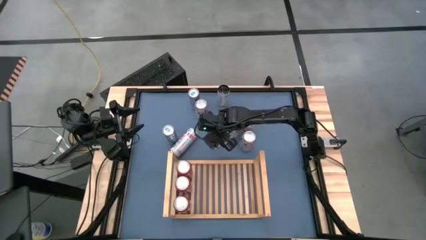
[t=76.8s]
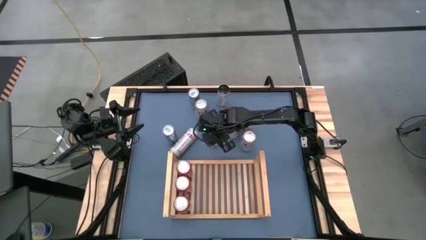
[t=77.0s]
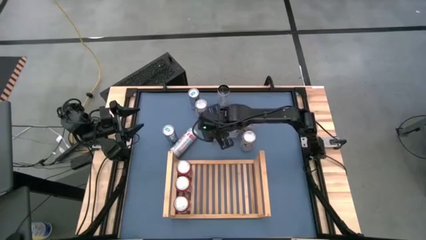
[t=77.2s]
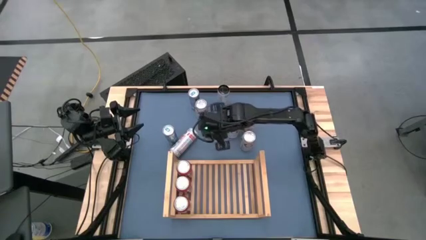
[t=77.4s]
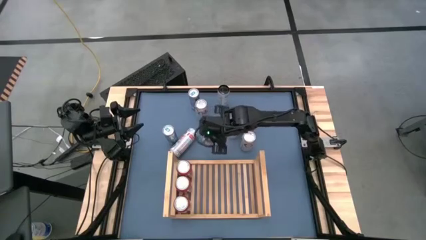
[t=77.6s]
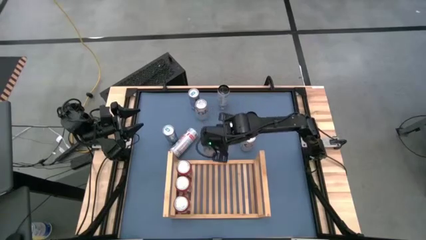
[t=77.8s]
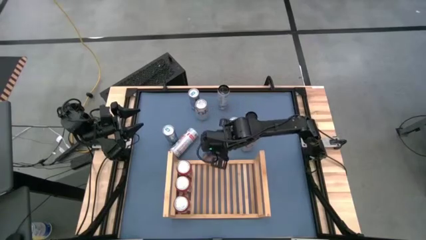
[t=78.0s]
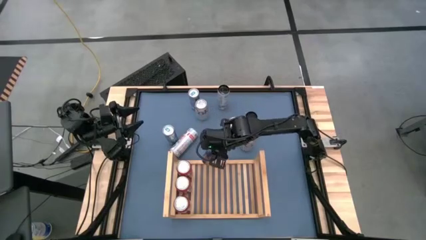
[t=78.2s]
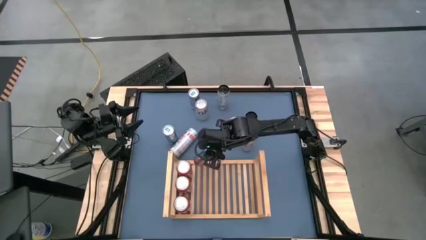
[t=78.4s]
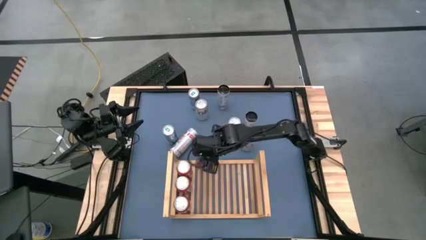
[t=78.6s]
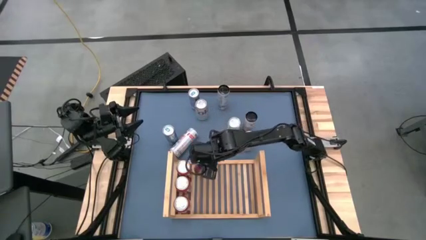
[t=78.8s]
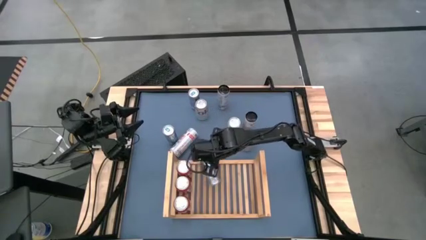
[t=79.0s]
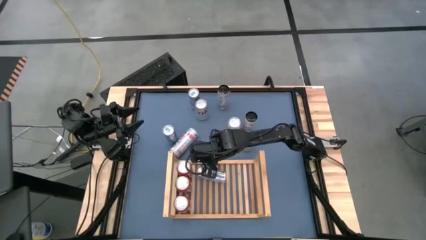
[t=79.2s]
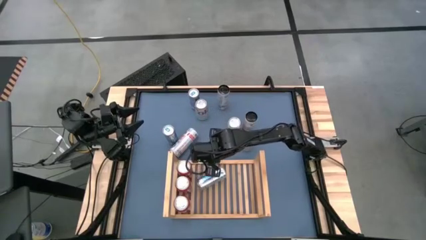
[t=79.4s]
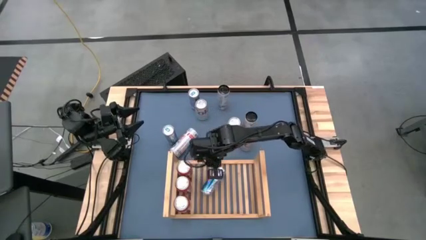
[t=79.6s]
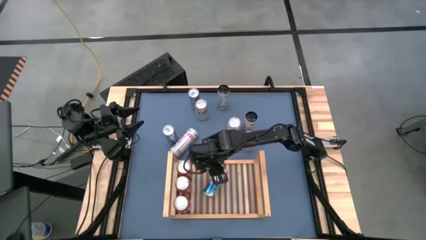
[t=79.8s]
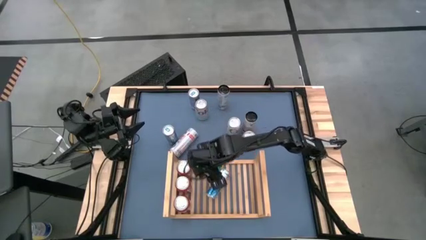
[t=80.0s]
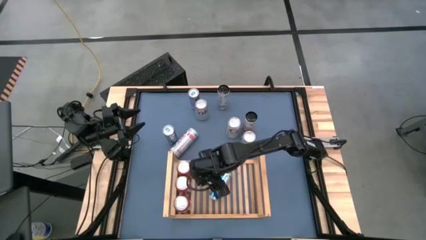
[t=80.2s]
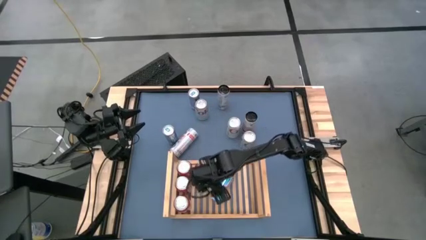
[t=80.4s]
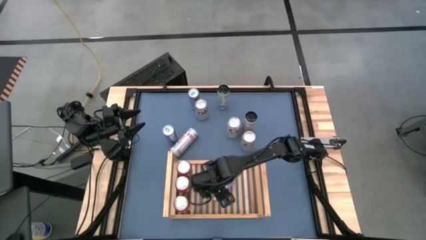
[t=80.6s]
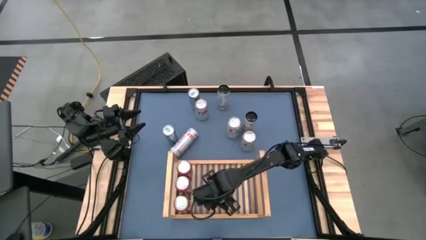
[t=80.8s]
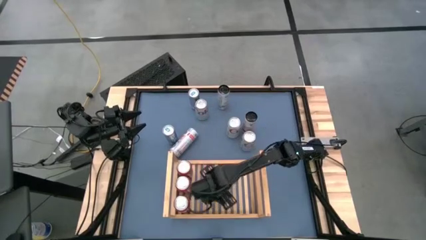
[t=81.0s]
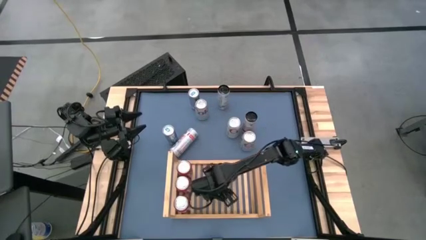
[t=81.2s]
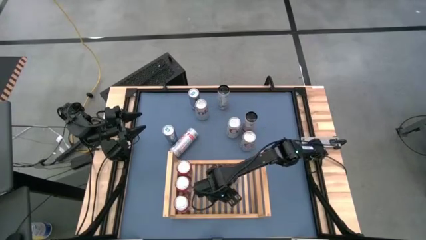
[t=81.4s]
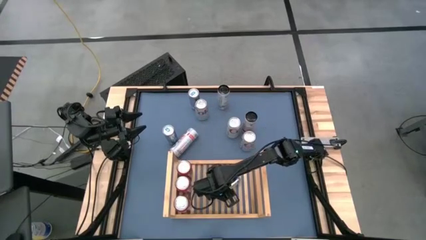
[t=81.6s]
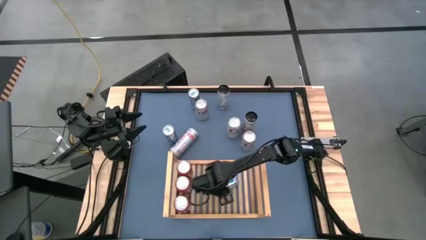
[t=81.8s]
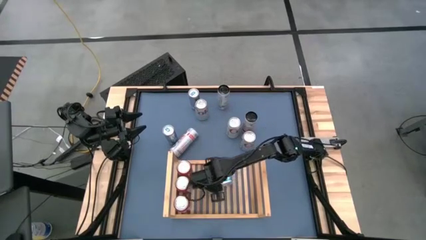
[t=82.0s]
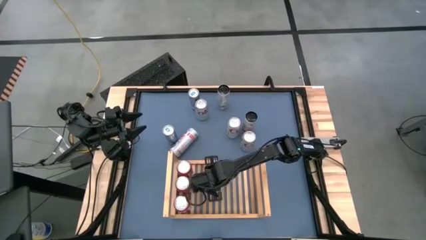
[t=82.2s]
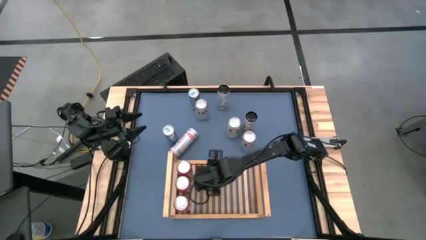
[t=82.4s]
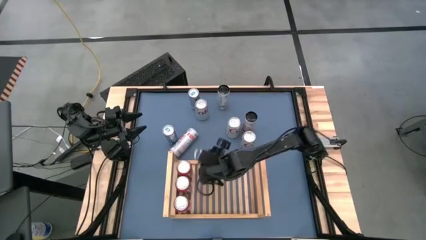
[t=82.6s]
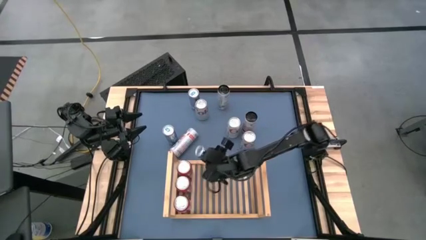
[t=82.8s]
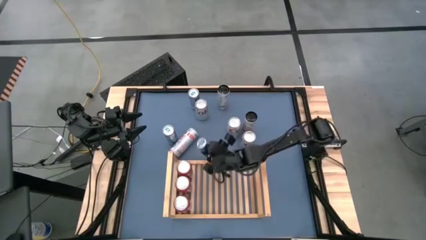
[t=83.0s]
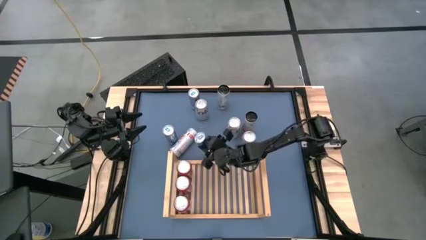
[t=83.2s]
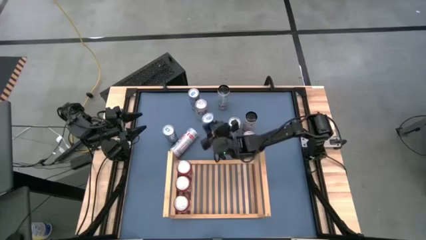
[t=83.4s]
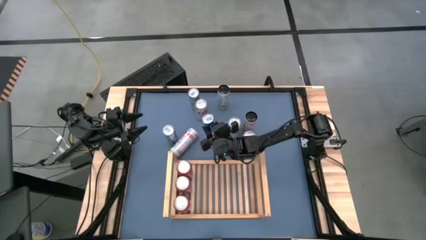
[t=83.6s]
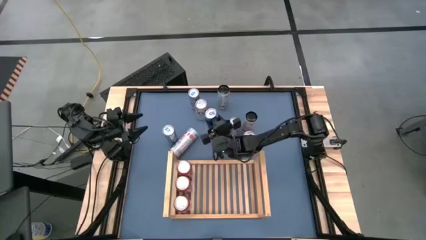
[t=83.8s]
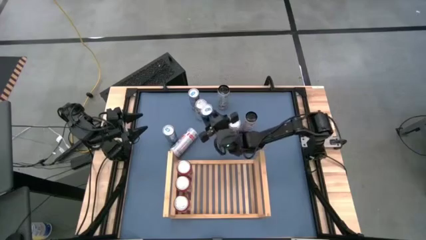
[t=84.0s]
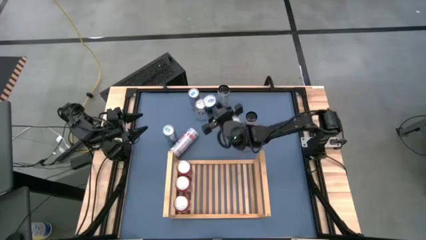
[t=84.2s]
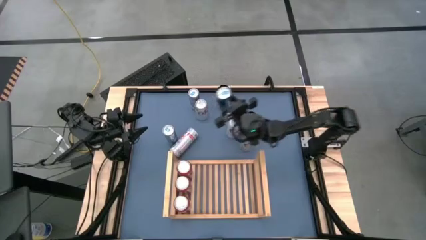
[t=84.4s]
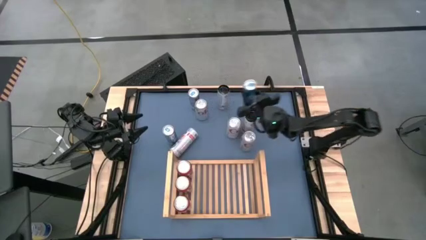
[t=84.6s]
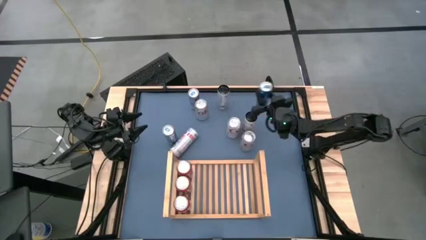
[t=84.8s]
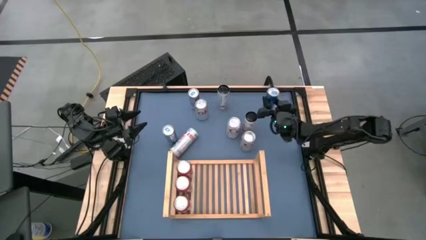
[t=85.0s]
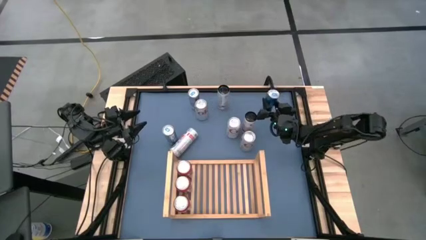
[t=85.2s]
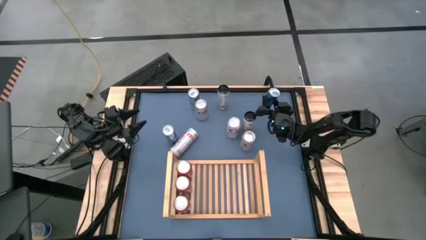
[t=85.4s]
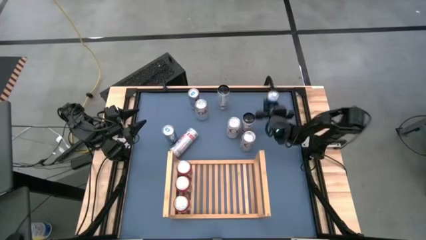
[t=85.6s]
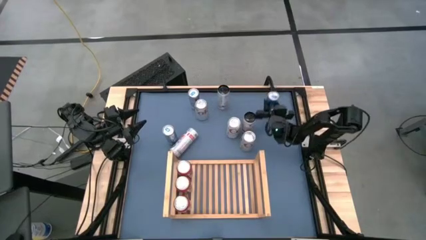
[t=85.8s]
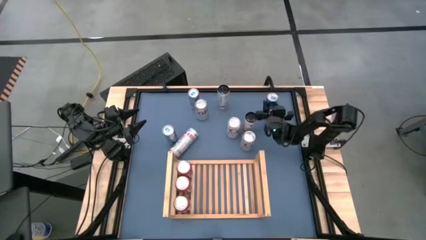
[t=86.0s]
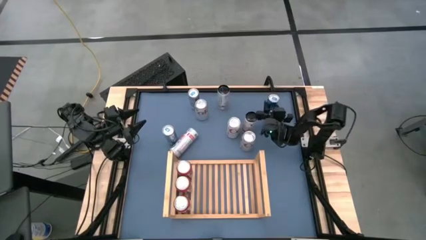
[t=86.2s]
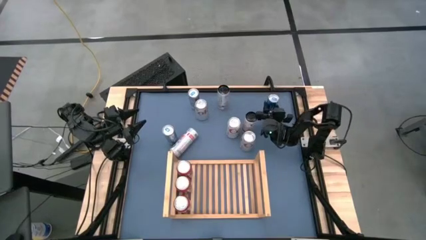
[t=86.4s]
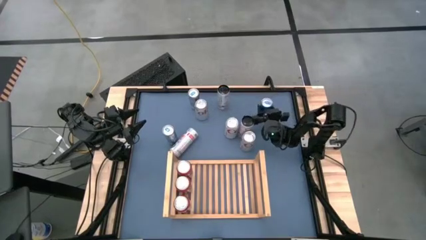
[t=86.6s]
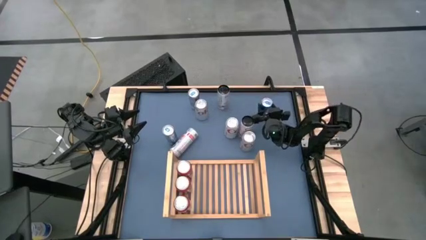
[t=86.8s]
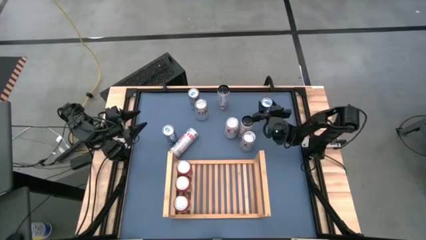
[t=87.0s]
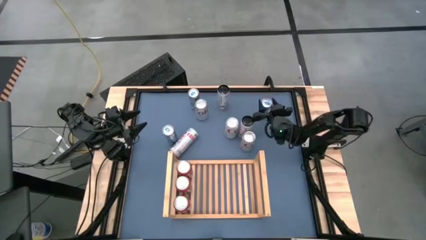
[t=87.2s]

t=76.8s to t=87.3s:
Task: Place canned beverage on shelf
Put the bottom blue soda can on the shelf
